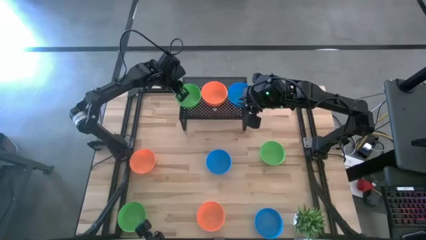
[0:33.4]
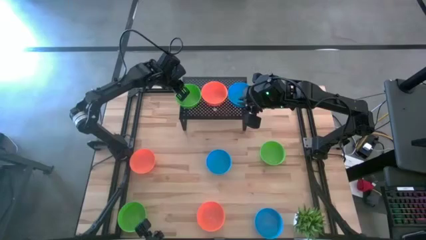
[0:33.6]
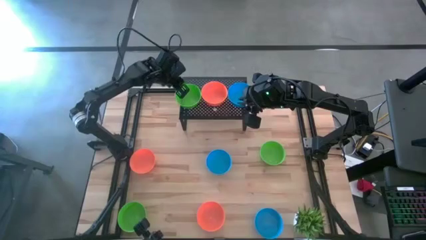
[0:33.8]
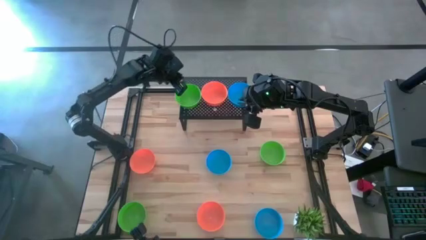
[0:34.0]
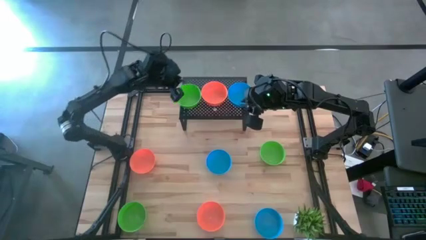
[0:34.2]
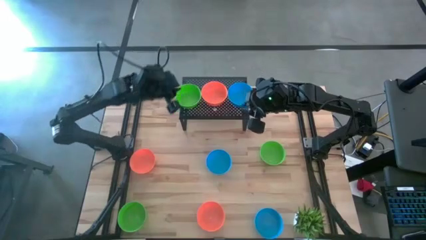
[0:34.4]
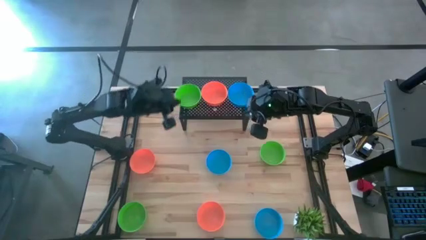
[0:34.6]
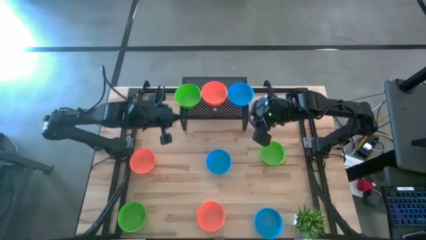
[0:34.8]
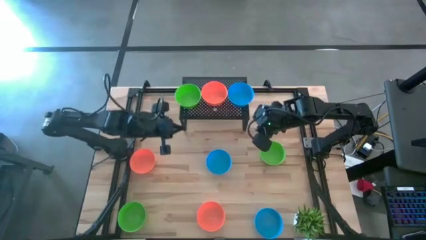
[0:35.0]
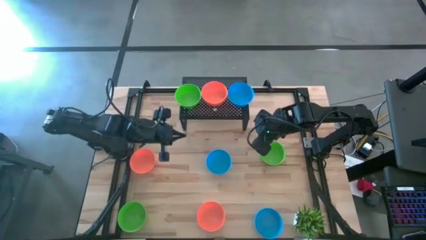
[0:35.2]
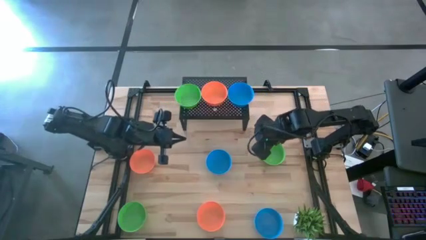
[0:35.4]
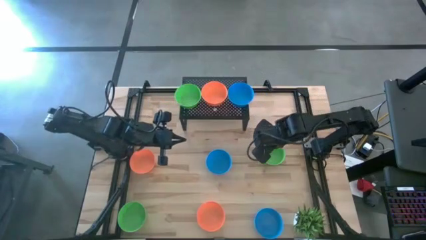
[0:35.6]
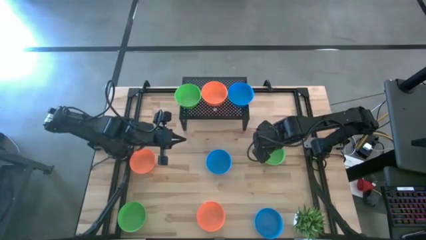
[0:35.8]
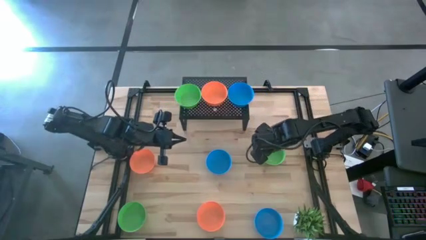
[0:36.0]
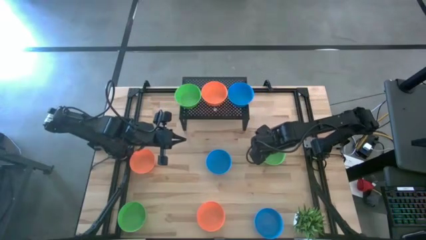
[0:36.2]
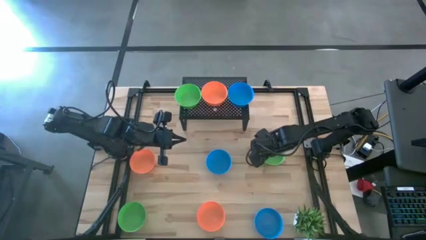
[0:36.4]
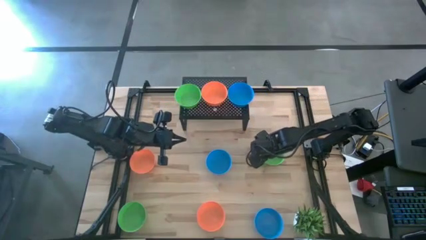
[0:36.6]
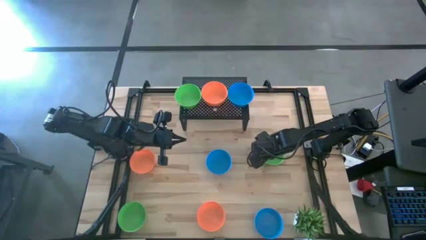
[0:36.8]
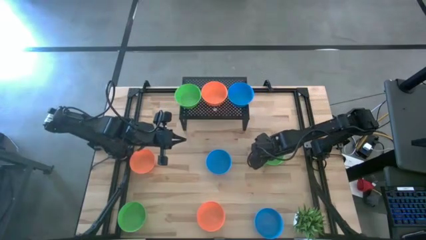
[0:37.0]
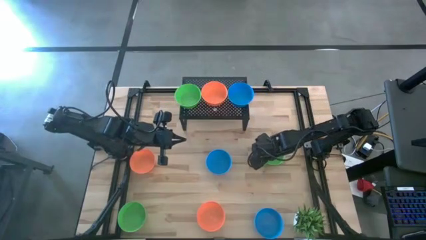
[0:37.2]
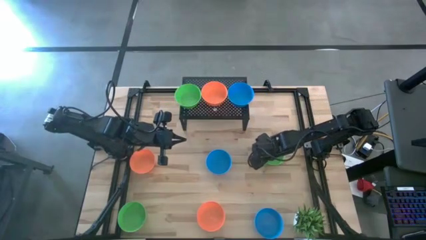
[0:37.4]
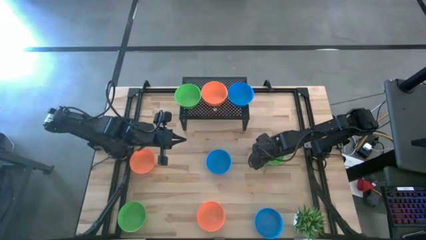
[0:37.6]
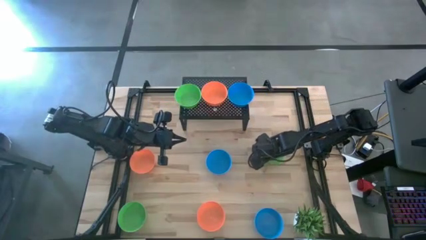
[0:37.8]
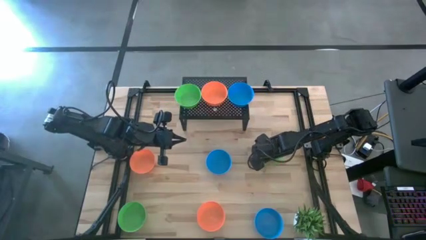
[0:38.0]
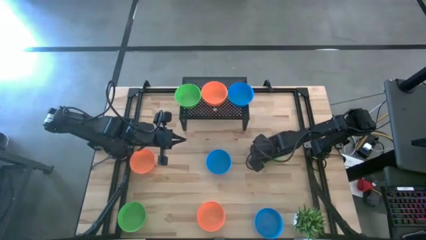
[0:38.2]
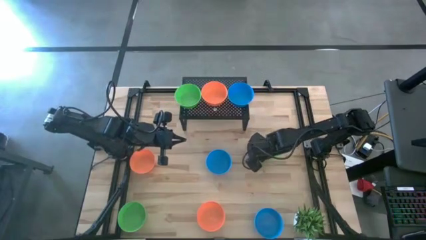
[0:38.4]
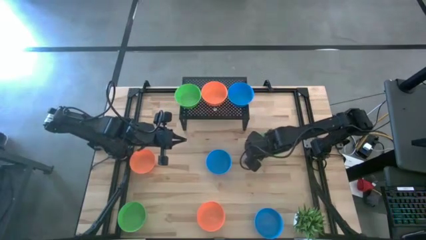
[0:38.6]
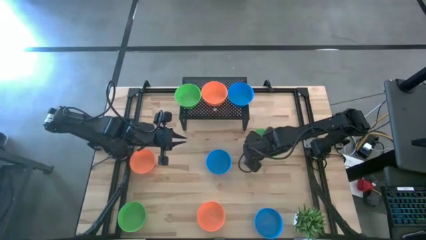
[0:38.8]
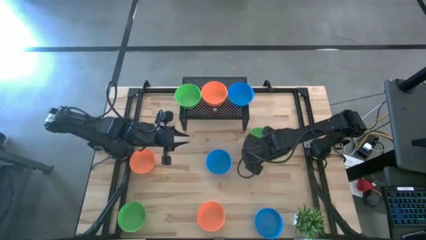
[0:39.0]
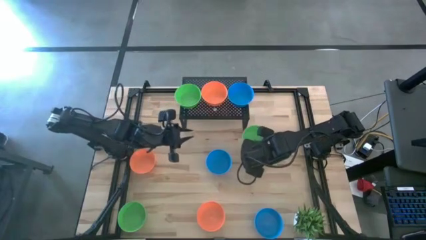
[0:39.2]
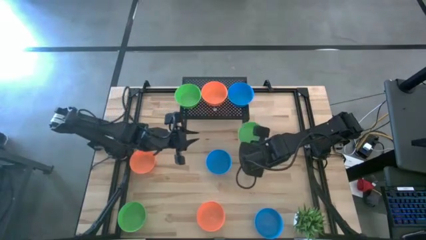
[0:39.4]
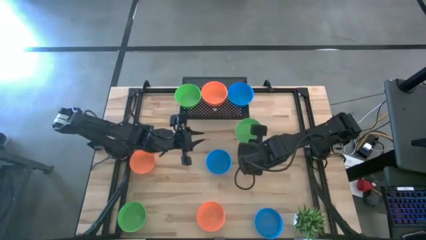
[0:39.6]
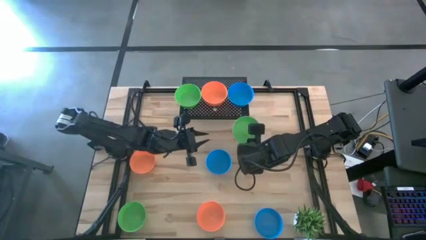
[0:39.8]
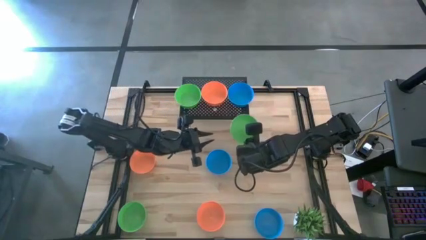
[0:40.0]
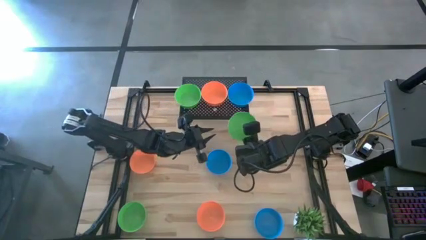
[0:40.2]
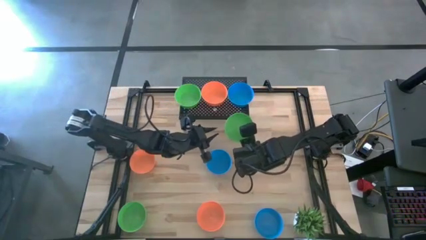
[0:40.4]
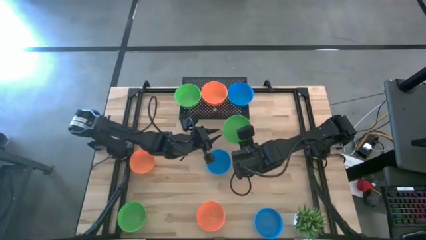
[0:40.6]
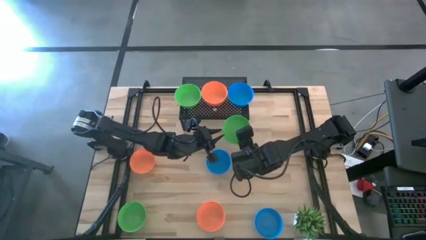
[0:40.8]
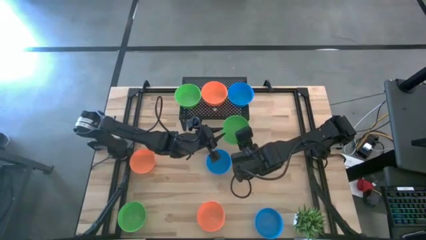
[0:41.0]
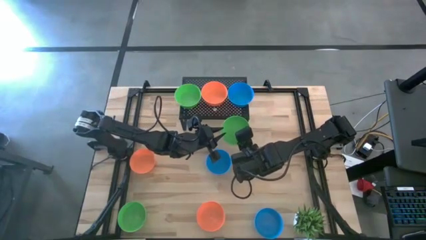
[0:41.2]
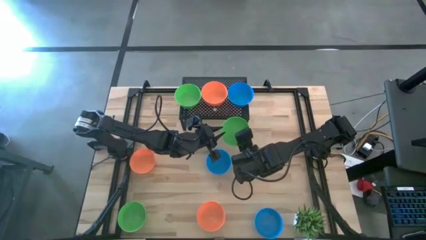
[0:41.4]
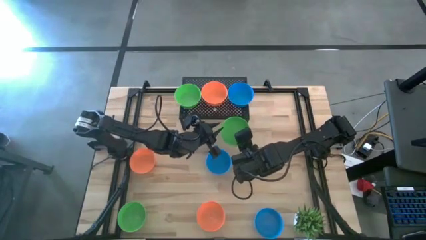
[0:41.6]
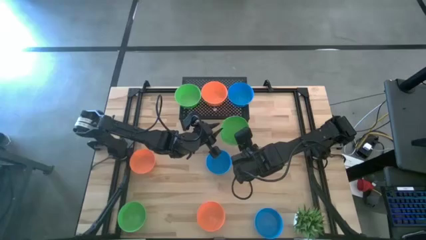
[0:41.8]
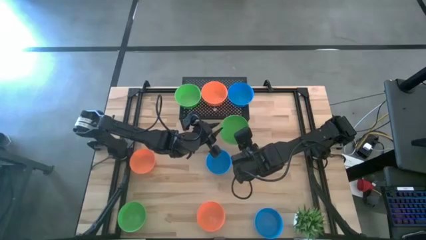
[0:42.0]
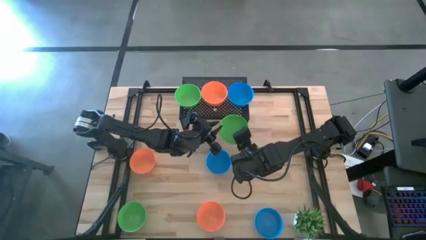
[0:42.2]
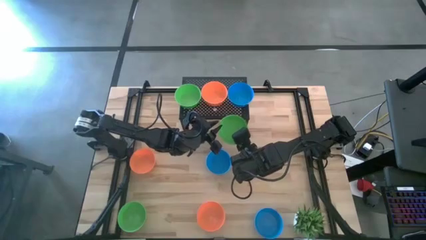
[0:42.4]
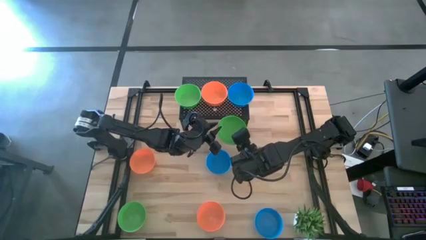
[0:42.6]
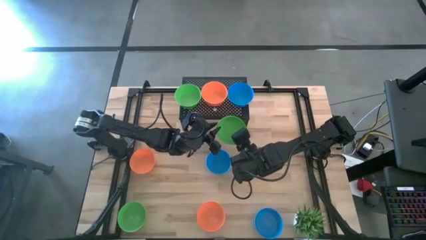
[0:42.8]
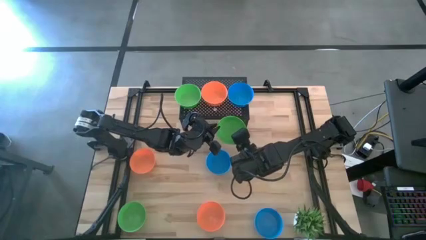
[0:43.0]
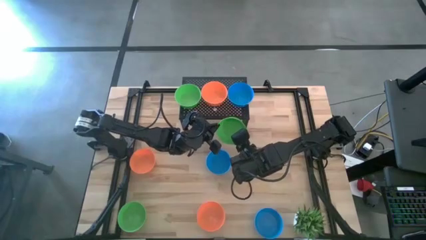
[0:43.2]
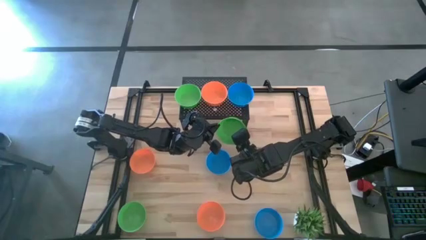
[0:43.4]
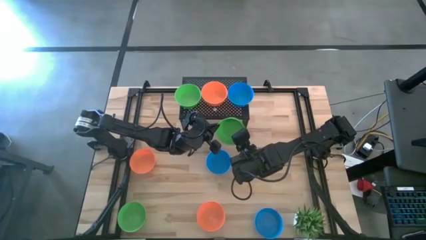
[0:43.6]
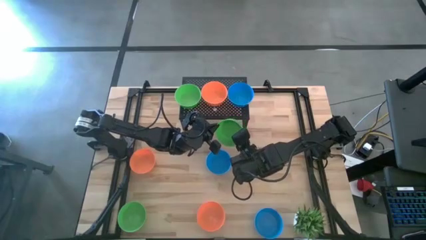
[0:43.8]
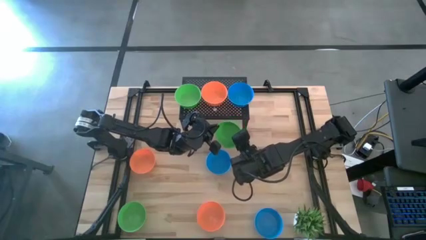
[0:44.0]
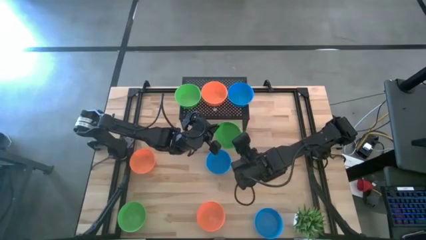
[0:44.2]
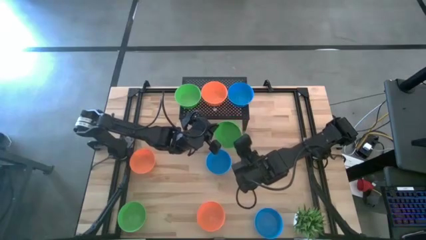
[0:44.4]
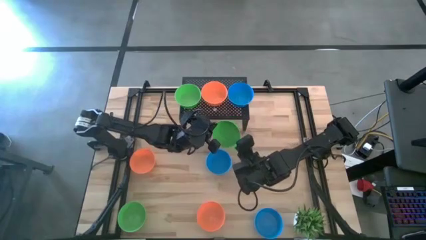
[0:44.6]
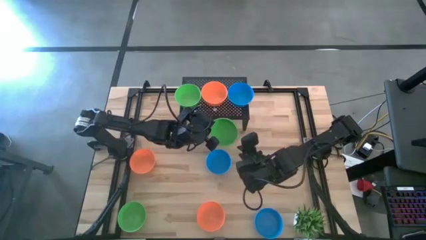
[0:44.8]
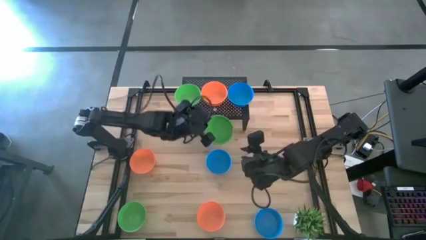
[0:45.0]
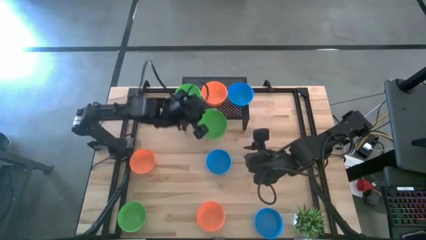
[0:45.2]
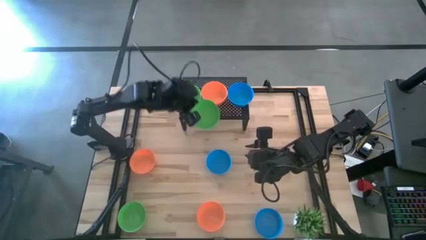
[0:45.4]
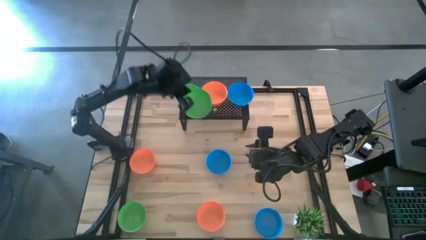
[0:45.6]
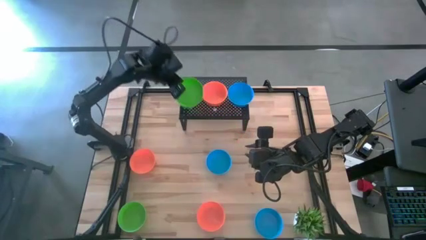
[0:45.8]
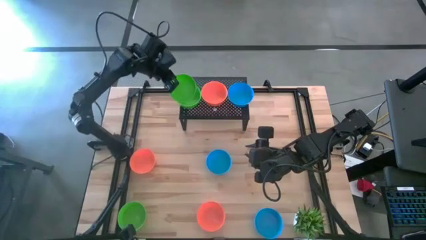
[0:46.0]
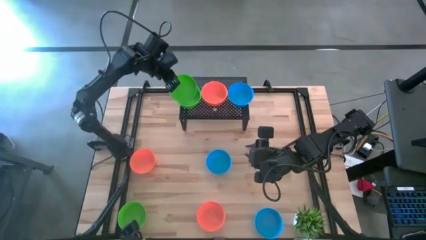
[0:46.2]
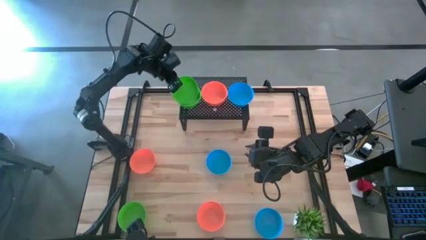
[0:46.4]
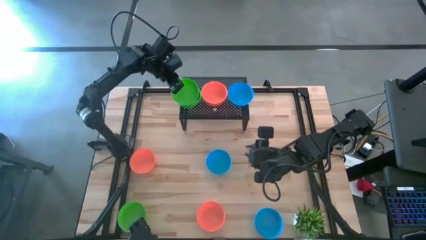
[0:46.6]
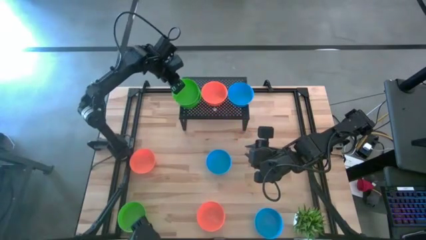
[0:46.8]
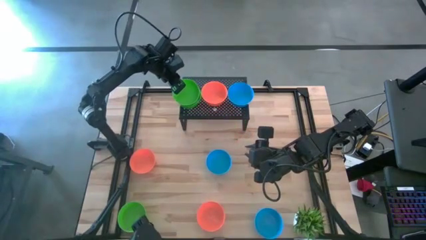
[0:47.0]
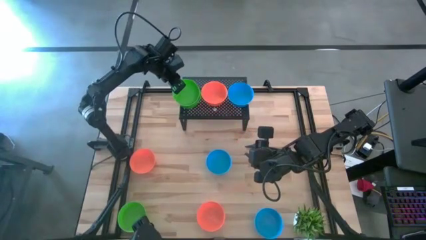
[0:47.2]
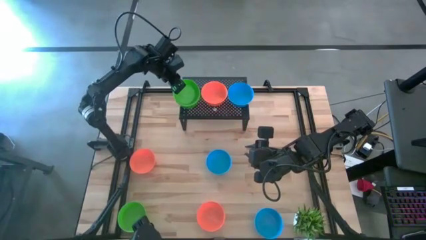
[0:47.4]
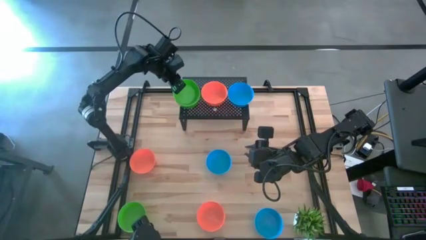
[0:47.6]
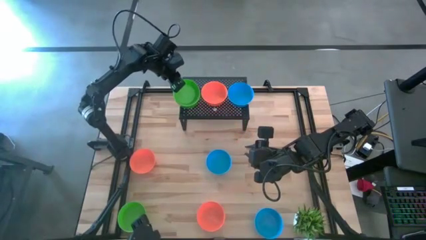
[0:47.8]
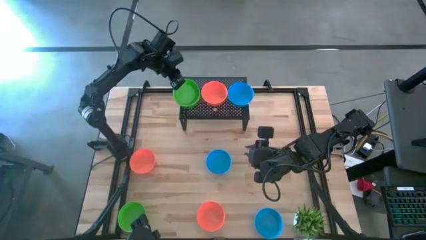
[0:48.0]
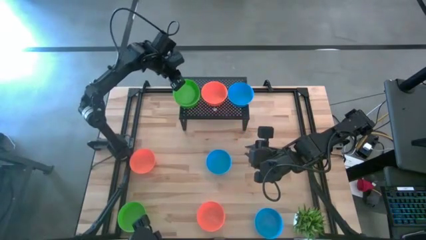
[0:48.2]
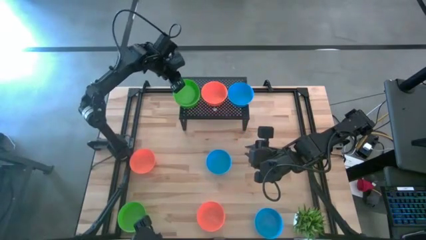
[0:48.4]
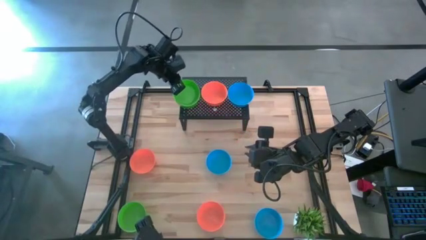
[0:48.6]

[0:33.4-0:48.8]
Task: Pick & Place Mini bowls
Stack the top green bowl on the green bowl on the shelf
